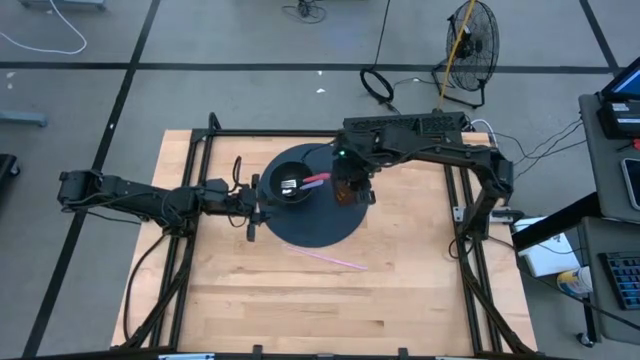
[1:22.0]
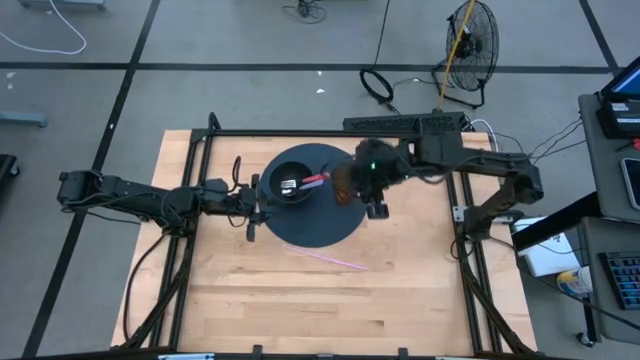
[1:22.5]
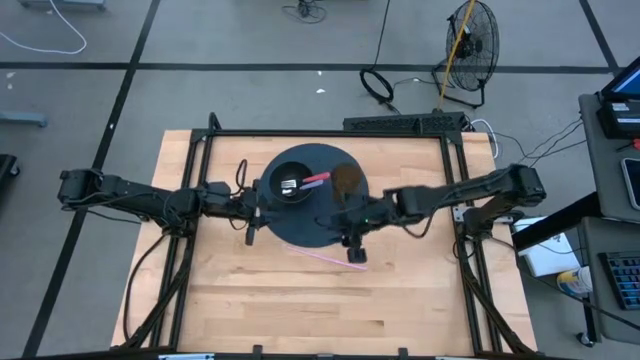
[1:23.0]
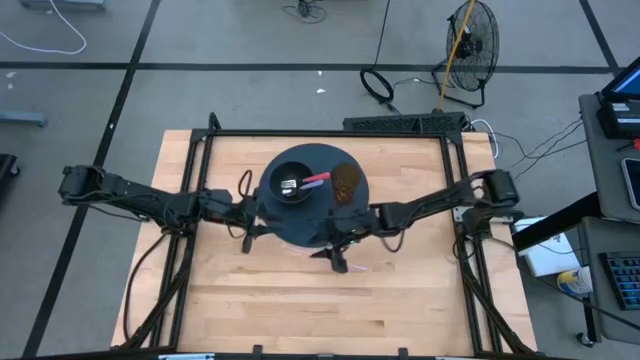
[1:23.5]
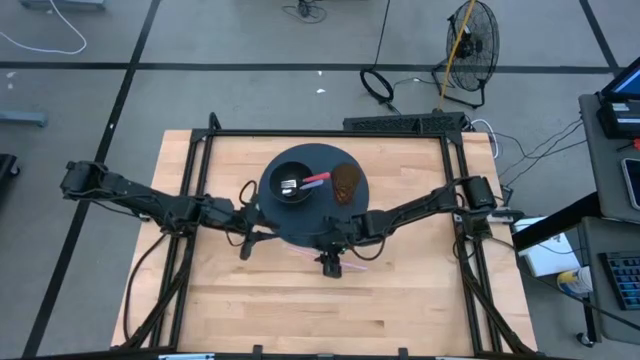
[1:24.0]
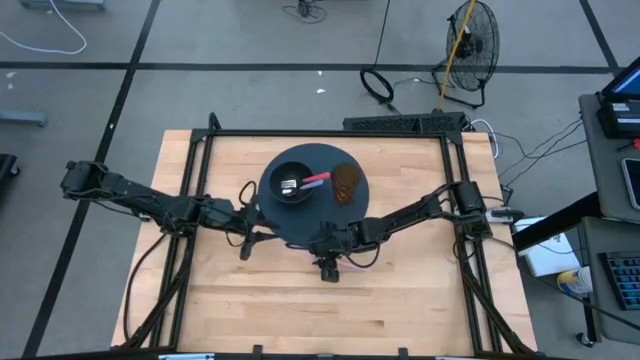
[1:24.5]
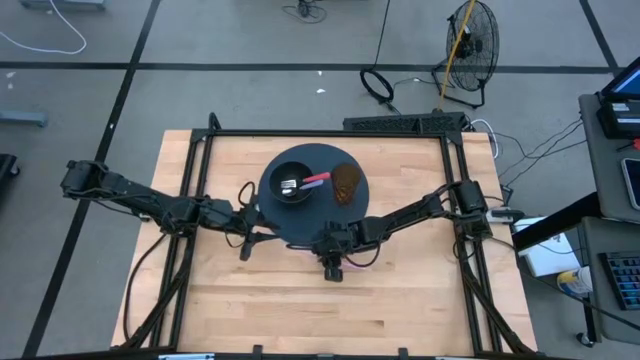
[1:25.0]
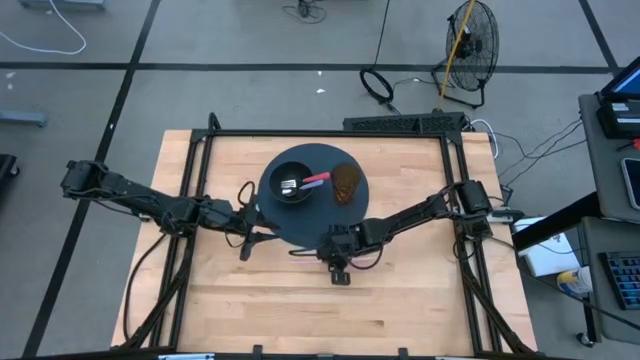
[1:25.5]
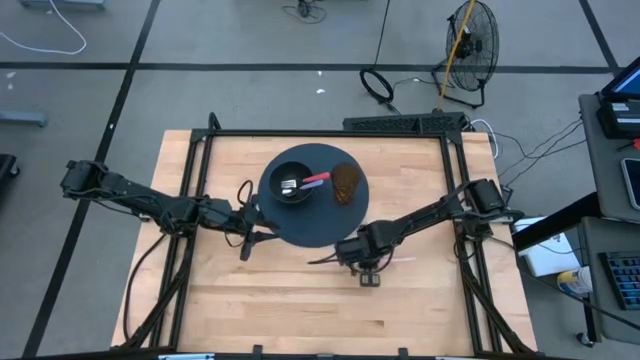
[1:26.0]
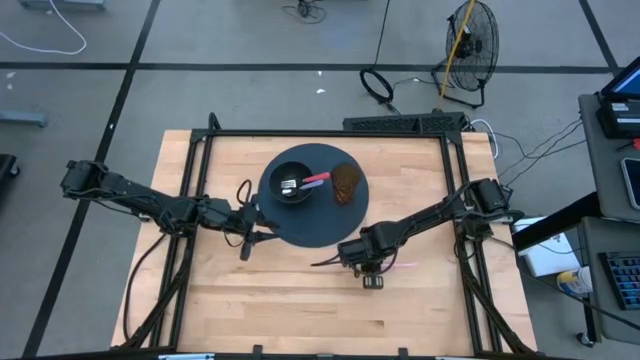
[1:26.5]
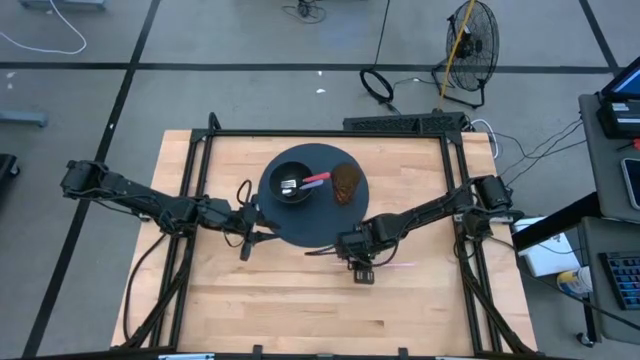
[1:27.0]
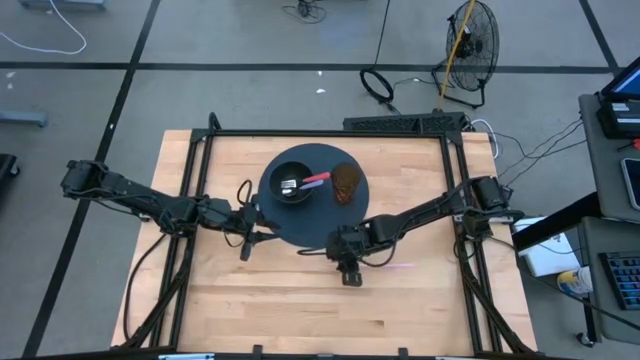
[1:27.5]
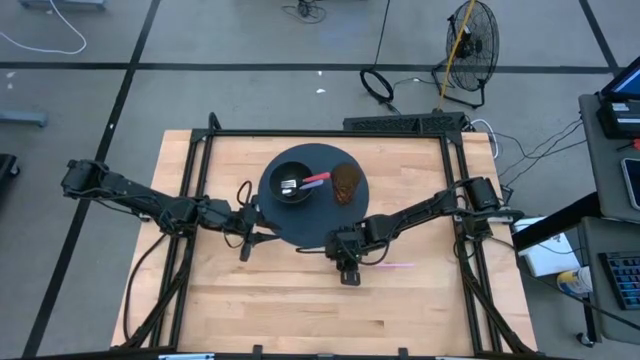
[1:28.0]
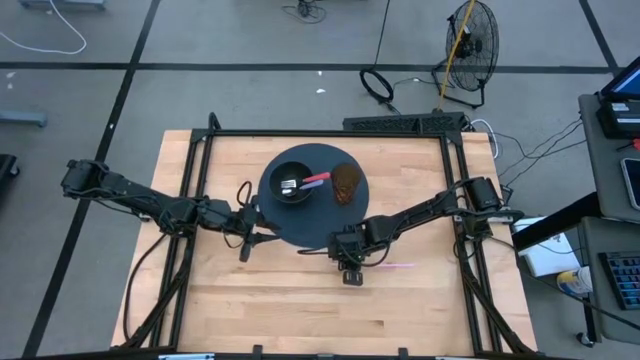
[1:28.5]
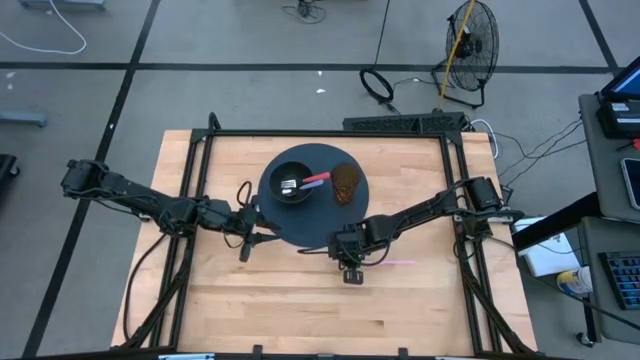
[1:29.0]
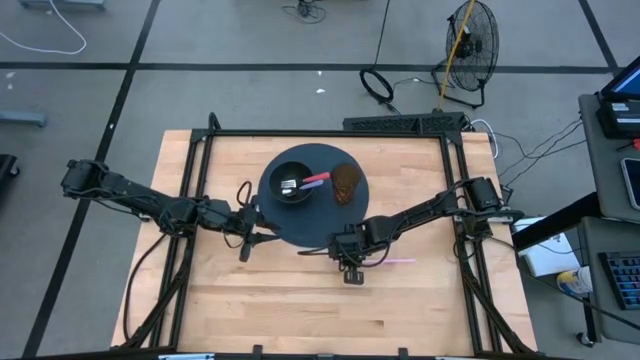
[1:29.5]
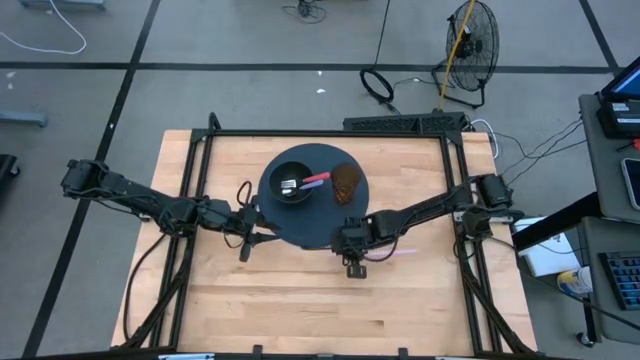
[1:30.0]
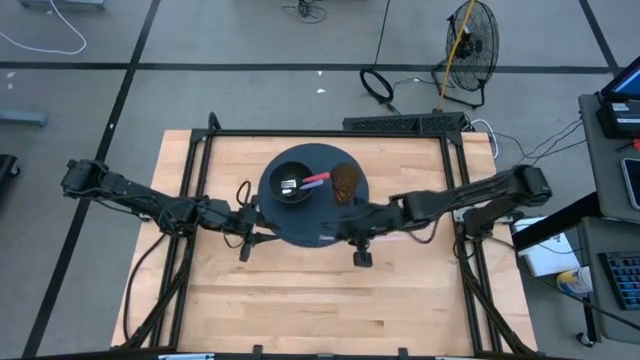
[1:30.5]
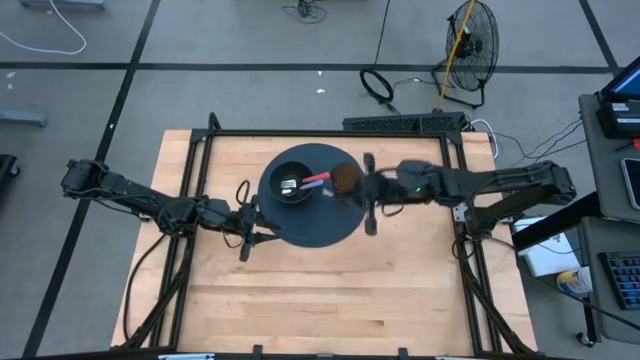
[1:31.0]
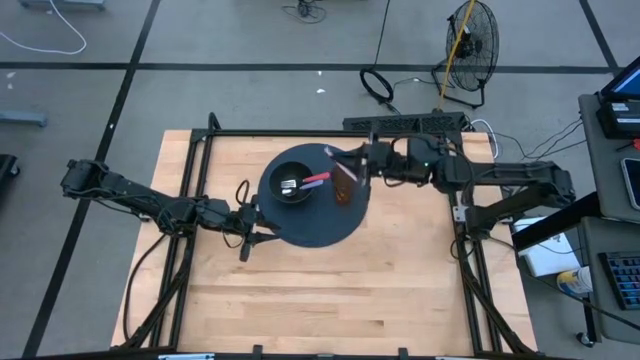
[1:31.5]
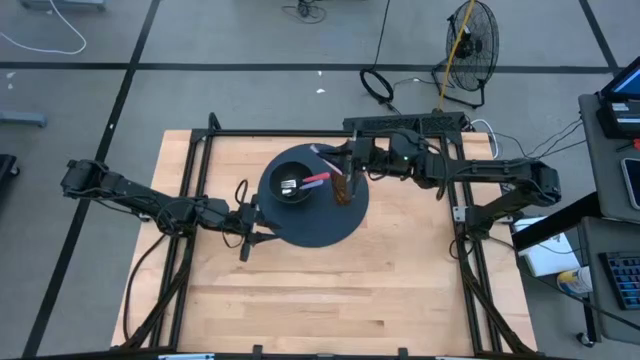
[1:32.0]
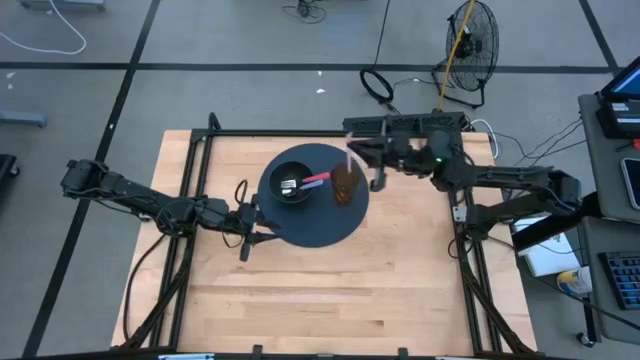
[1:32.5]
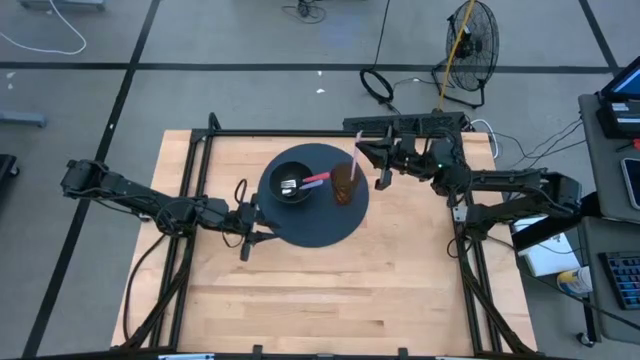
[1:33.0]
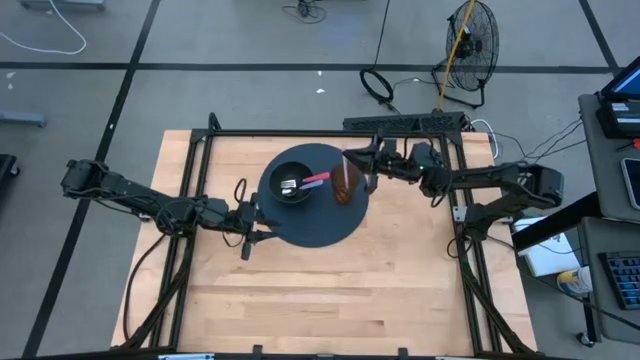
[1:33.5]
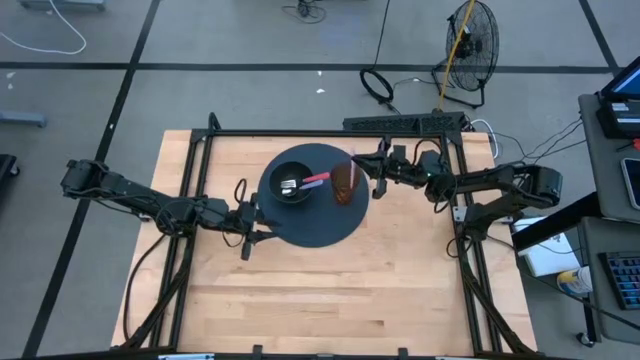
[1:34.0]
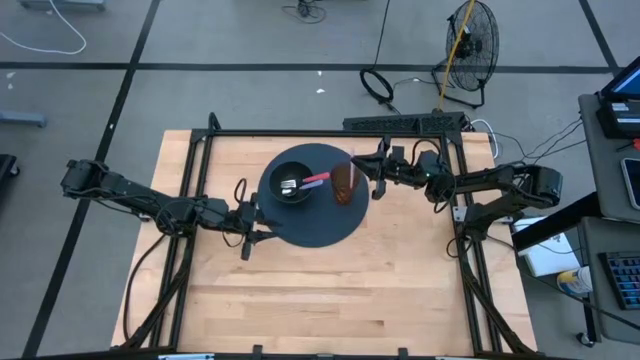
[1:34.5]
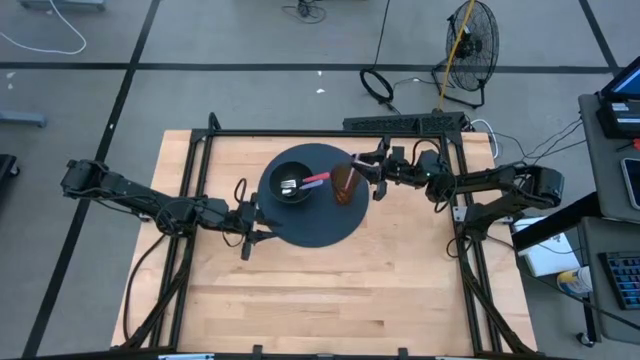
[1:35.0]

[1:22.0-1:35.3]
Task: Pick & Place Utensil
Put the straw into the glass

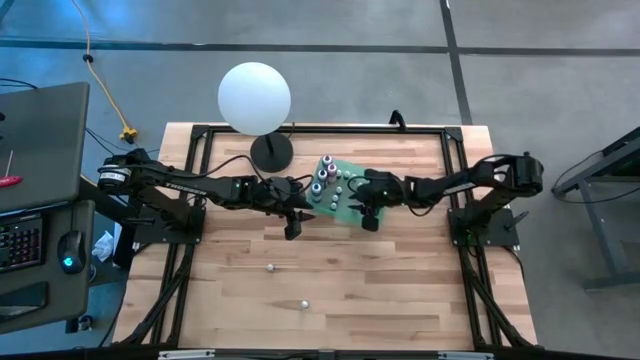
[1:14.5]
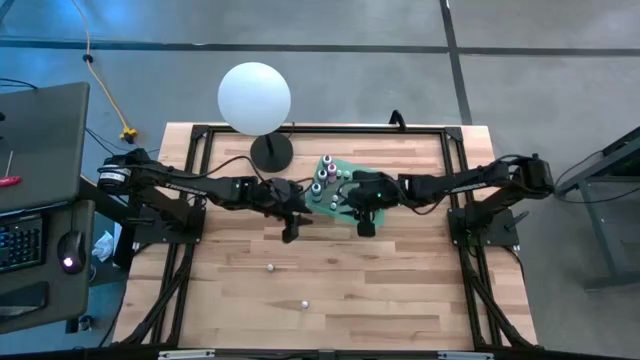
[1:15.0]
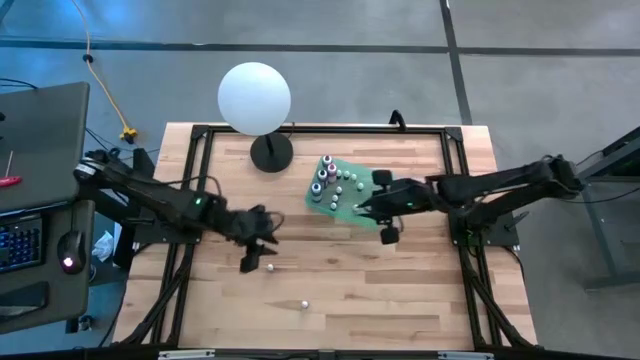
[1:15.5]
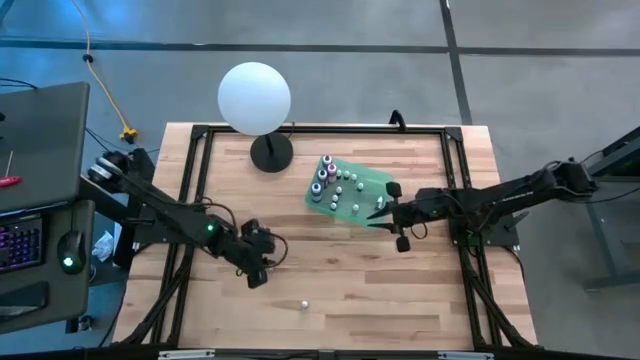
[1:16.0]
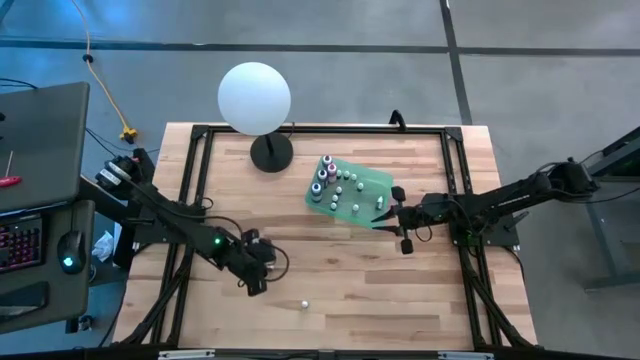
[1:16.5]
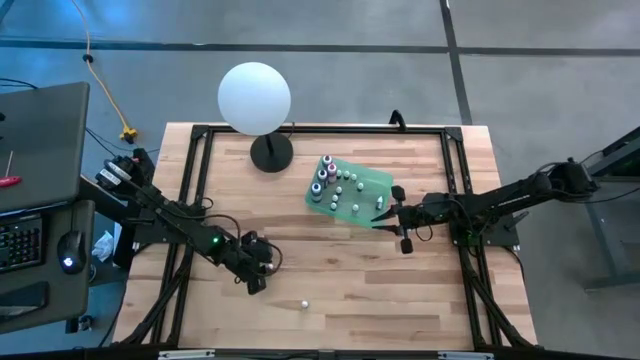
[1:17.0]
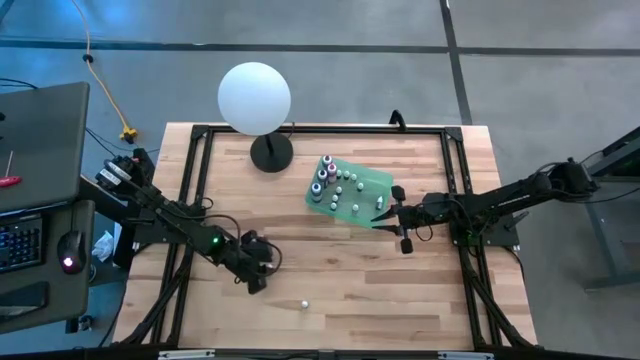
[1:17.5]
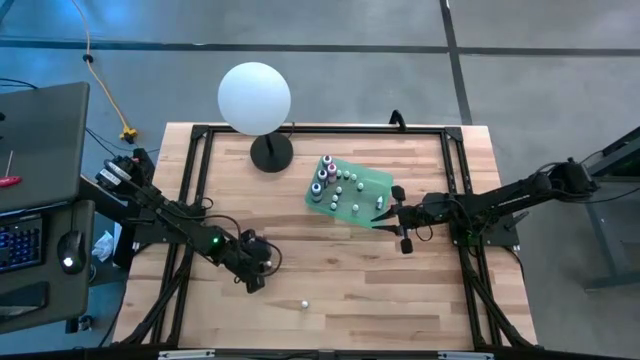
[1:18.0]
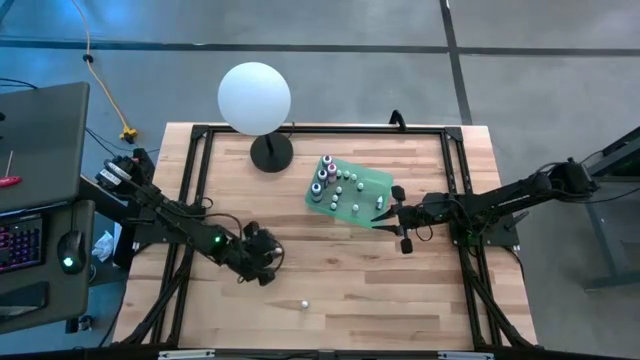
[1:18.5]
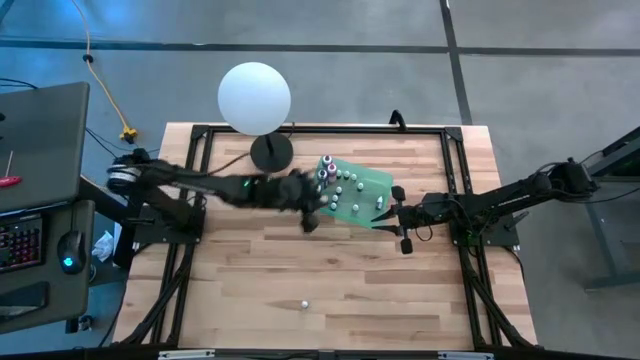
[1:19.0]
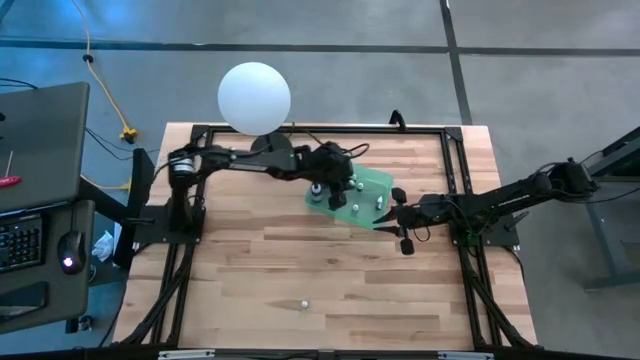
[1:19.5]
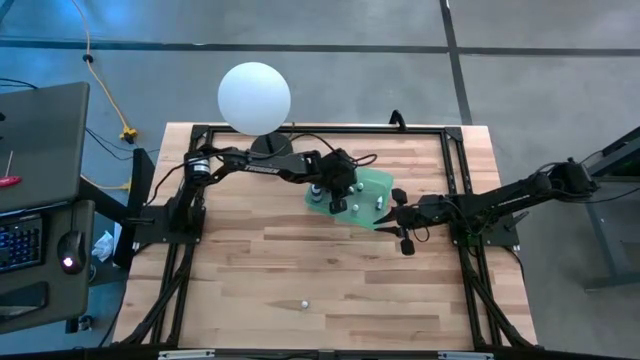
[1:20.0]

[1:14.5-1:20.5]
Task: Pick & Place food coloring
Put the small black food coloring bottle into the green container
